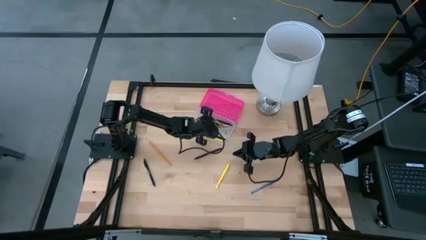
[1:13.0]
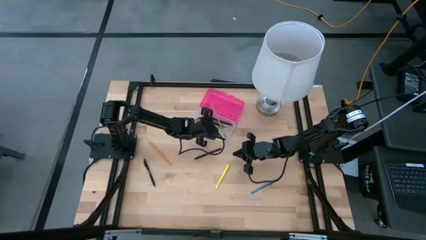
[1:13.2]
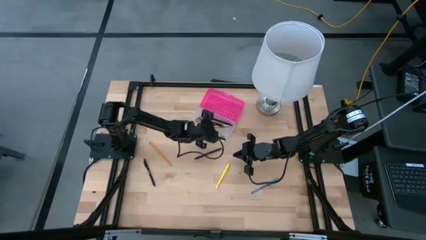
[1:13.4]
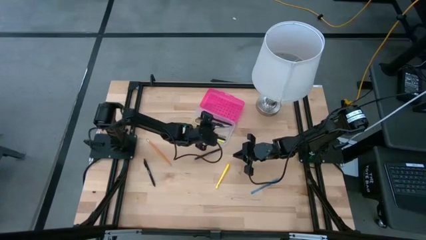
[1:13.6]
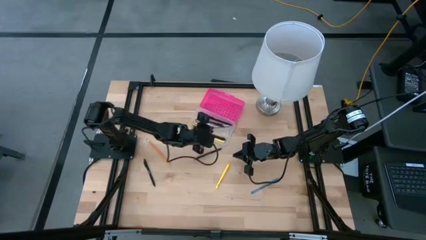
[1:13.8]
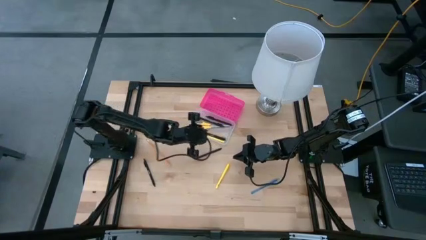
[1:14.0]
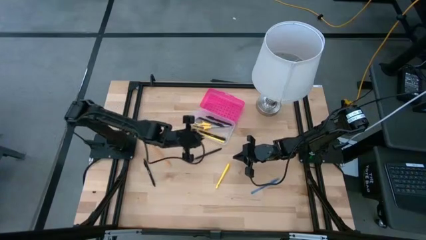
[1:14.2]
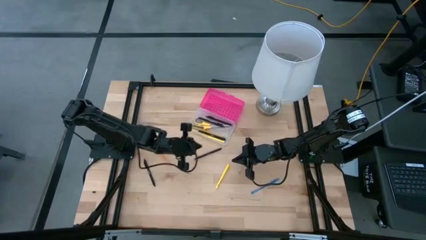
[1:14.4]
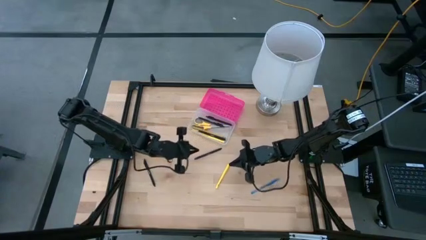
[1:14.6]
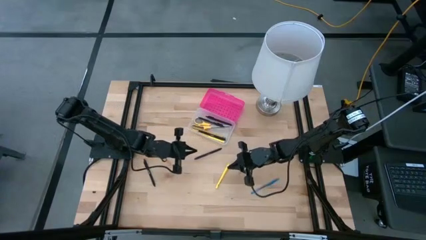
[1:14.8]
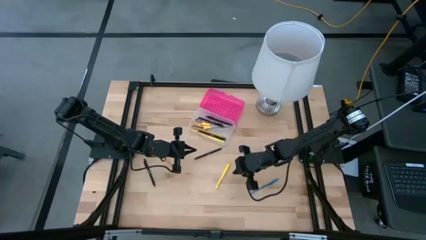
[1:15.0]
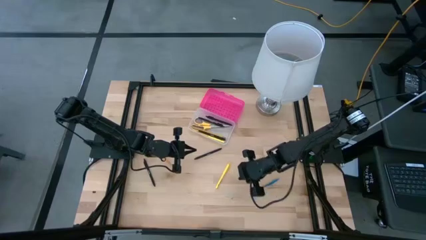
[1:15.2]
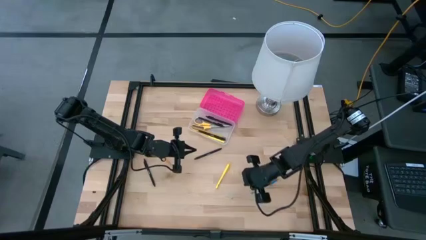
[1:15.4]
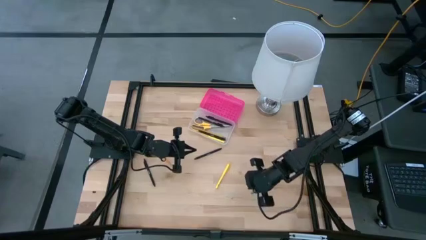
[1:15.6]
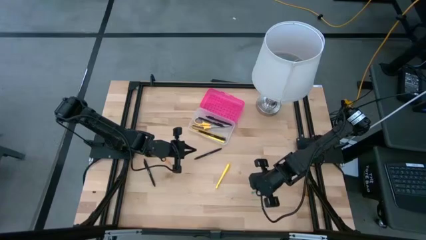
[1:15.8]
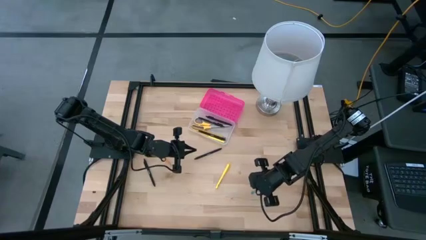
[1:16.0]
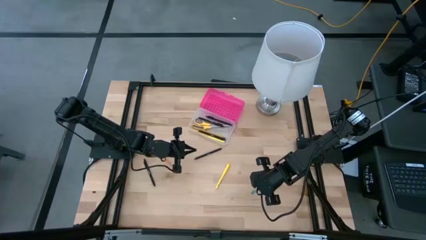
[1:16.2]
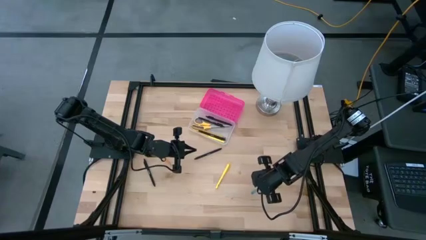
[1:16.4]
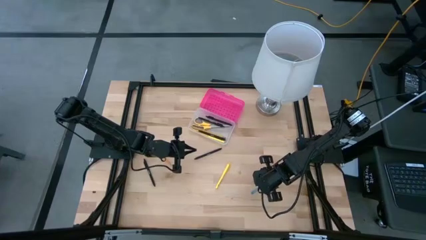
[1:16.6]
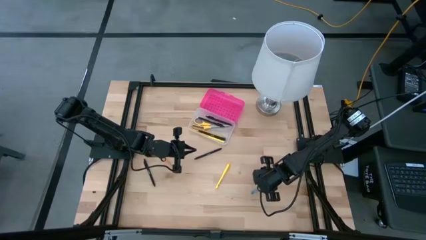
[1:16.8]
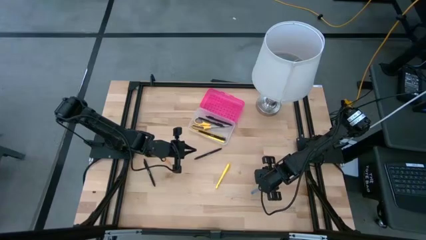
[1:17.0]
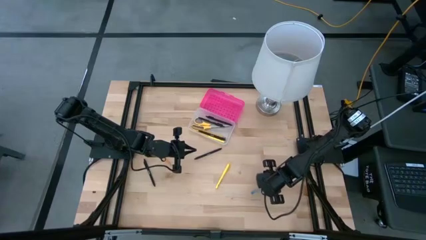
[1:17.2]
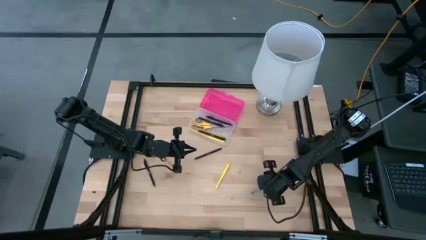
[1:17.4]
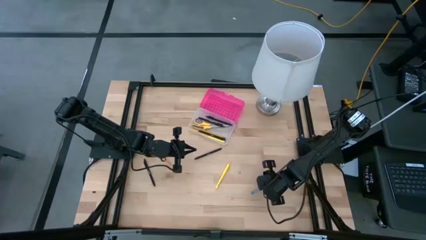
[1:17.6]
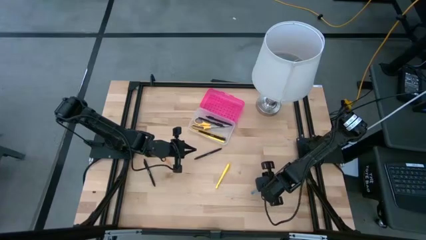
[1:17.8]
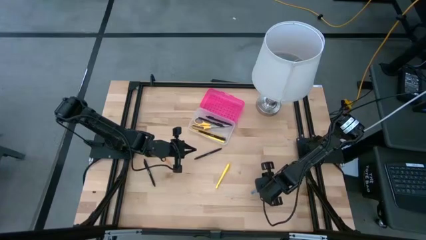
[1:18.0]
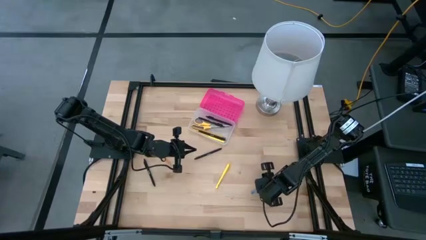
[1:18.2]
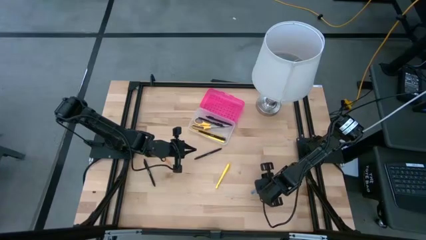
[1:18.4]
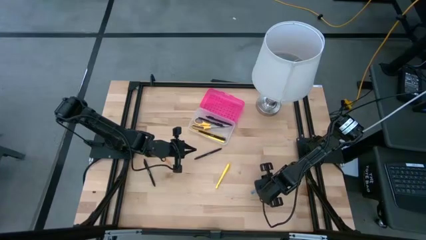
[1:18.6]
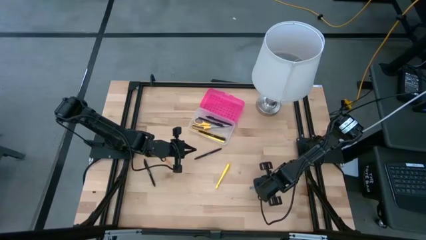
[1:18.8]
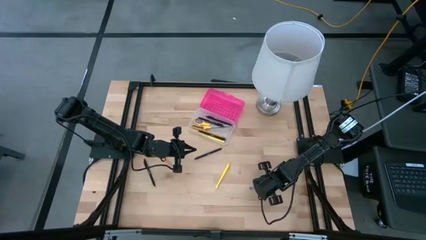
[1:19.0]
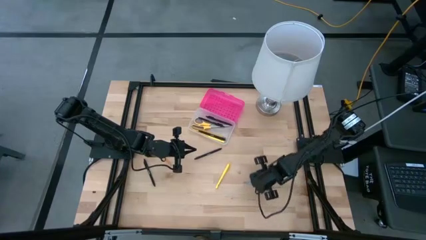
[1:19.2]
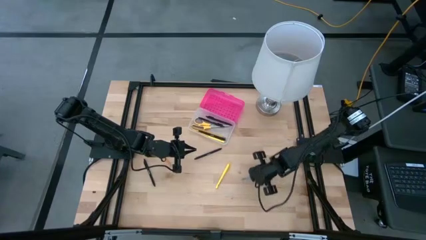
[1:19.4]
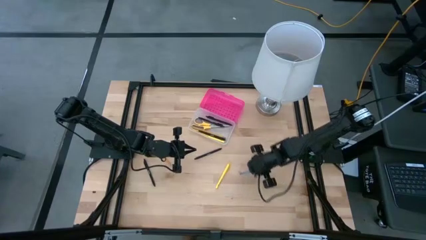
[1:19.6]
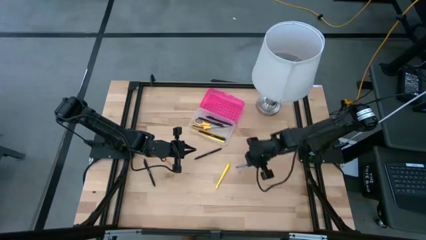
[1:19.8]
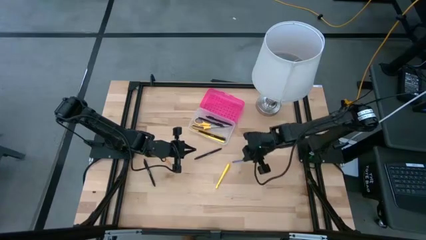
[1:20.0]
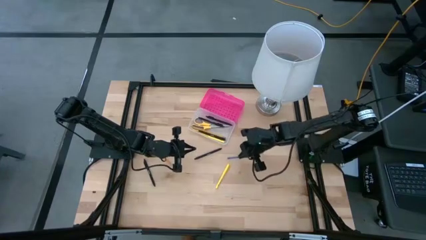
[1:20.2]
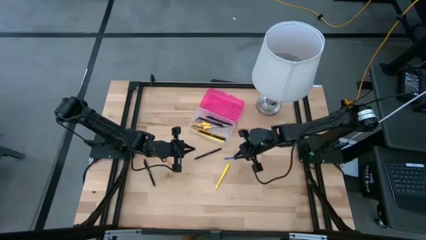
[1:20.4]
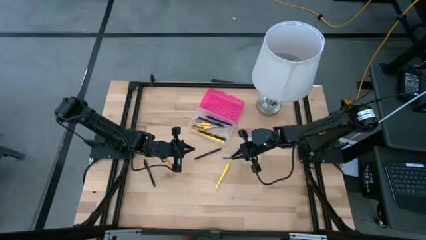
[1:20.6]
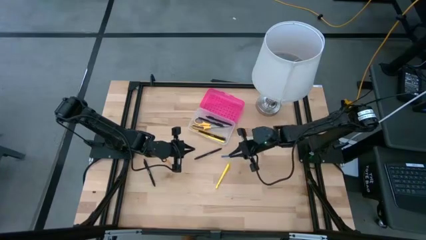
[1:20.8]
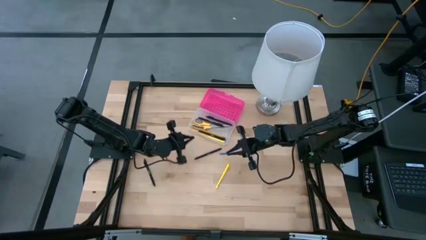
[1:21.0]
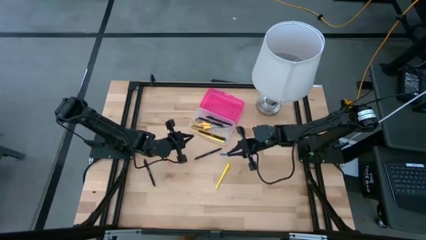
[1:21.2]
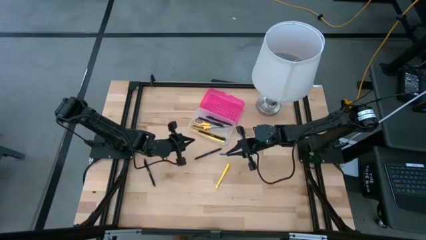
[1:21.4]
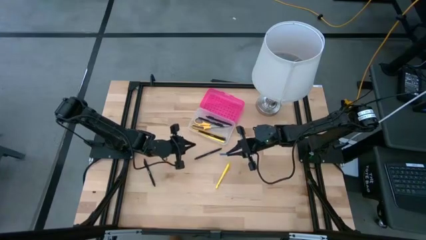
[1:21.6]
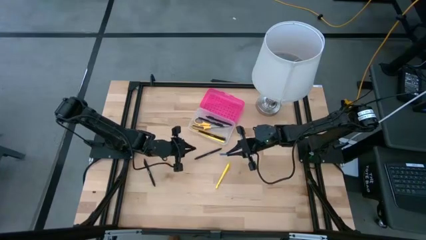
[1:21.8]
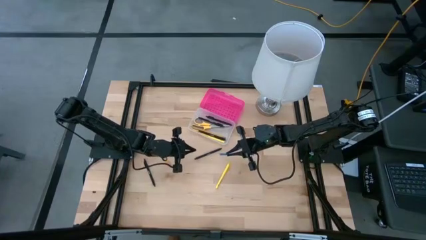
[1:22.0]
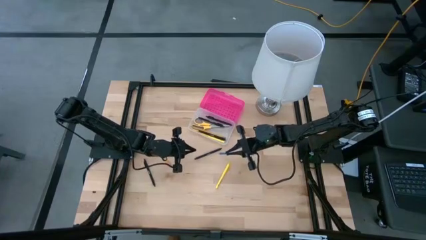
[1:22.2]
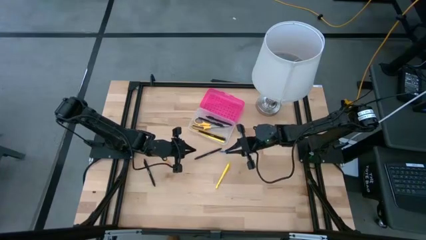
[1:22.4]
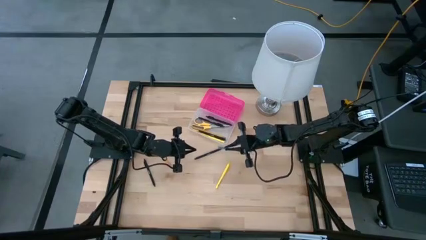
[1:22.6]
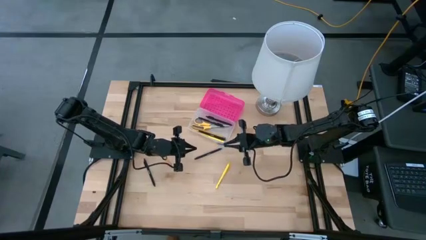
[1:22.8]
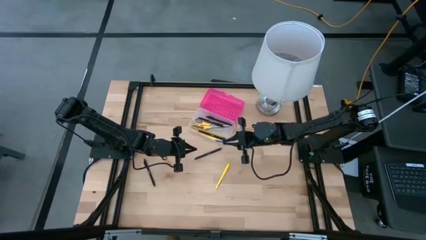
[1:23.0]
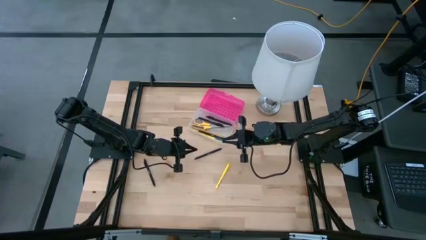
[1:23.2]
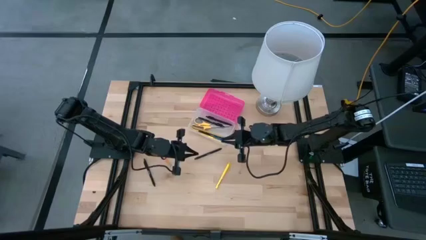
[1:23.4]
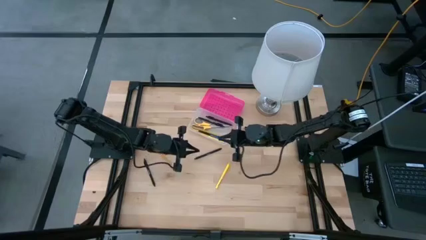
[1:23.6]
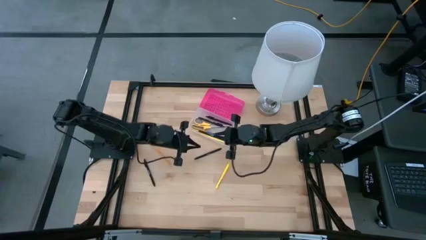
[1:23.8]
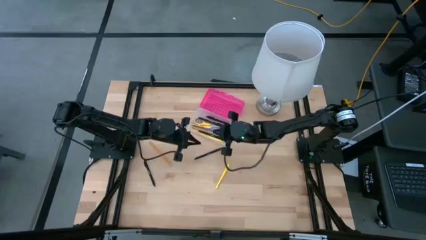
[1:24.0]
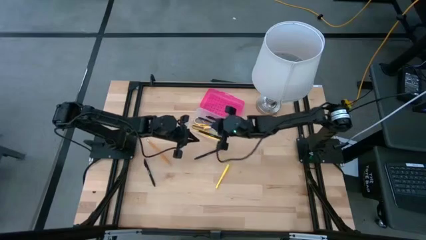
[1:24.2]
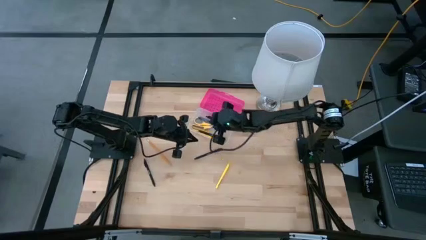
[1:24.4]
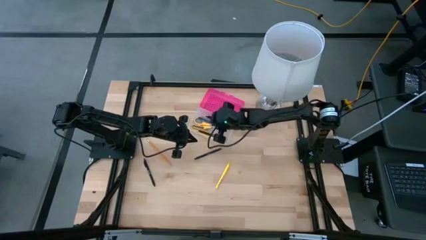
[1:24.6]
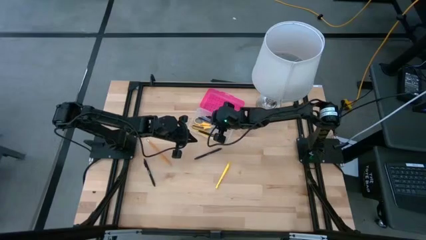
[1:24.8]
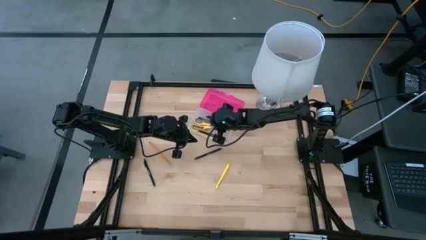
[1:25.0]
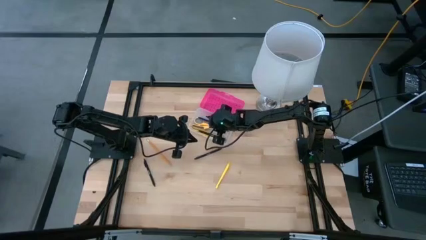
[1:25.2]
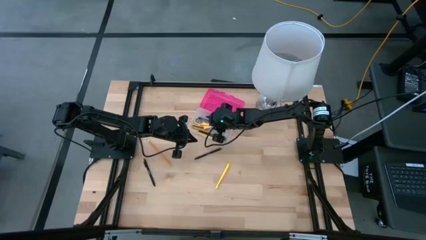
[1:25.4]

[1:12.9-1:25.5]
Task: Pick & place school supplies into a supply box
Put the blue pen into the pink supply box

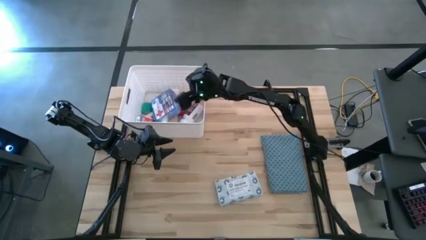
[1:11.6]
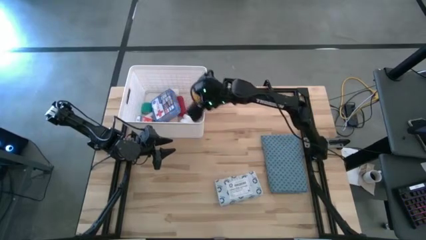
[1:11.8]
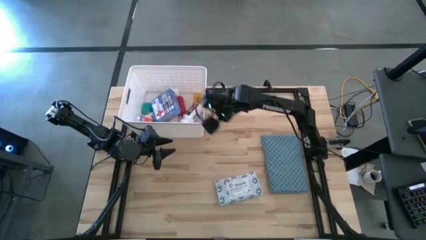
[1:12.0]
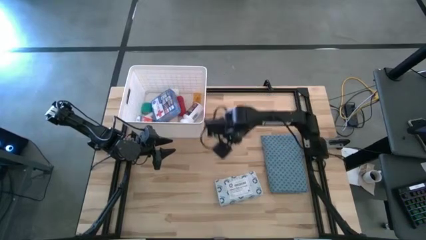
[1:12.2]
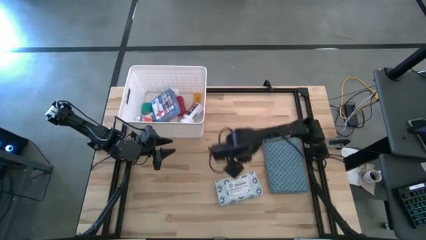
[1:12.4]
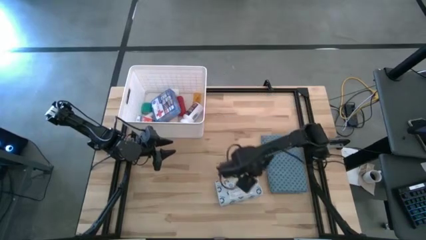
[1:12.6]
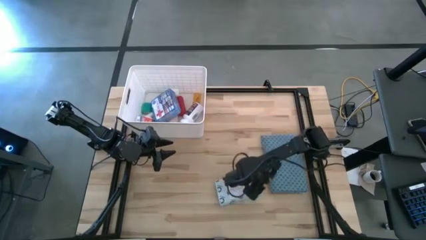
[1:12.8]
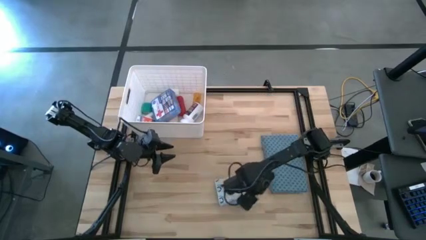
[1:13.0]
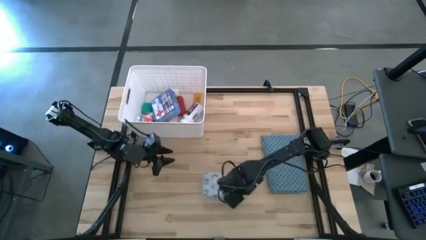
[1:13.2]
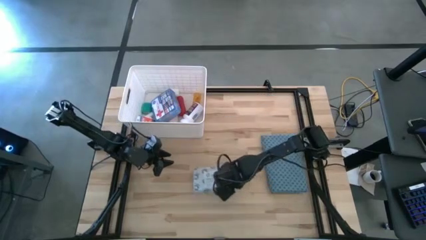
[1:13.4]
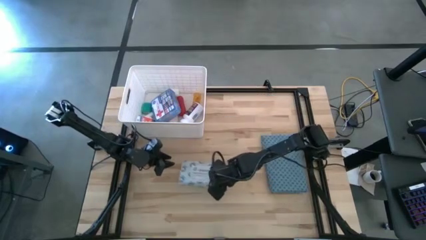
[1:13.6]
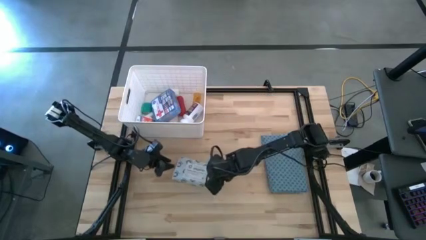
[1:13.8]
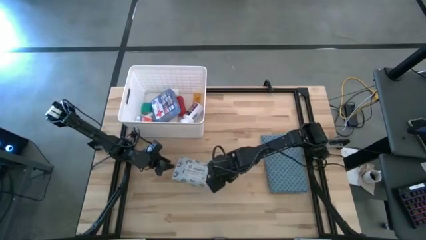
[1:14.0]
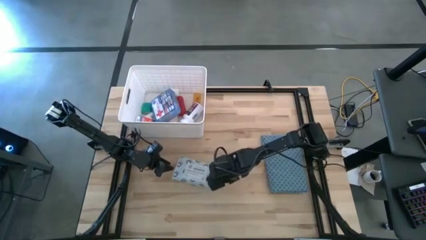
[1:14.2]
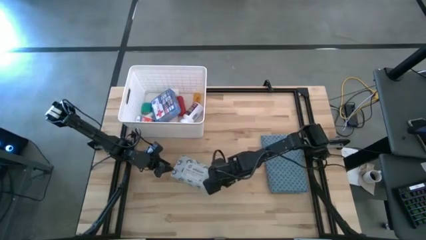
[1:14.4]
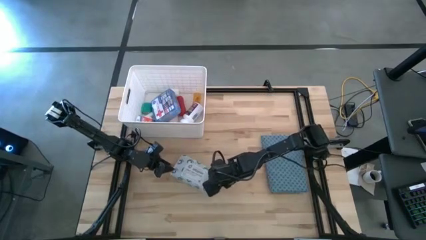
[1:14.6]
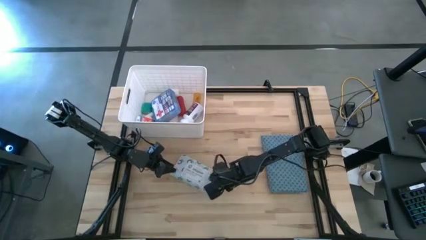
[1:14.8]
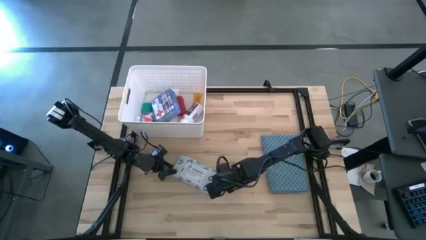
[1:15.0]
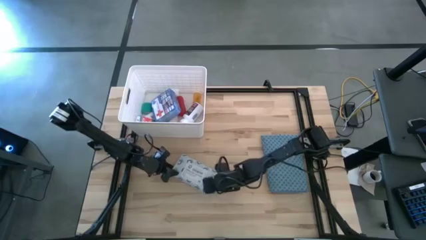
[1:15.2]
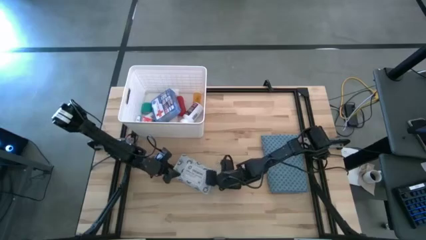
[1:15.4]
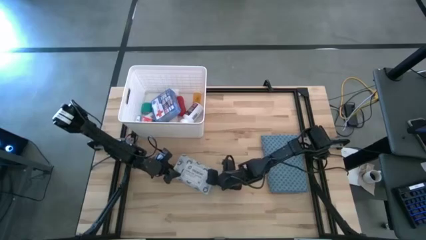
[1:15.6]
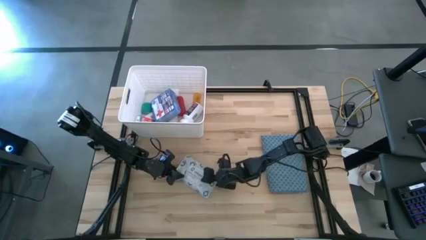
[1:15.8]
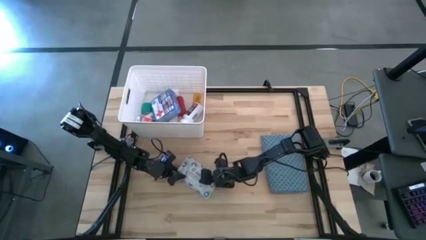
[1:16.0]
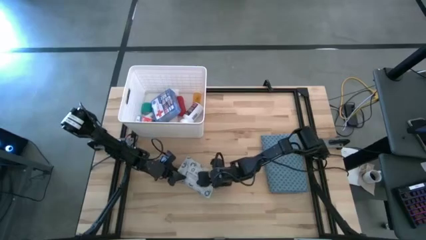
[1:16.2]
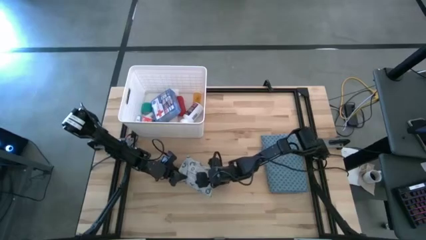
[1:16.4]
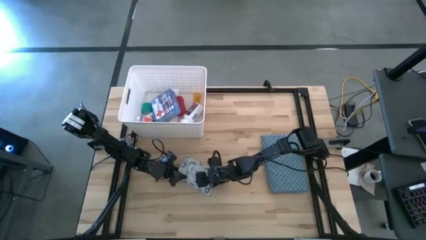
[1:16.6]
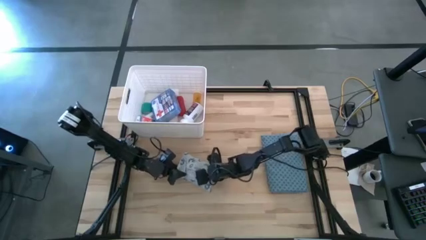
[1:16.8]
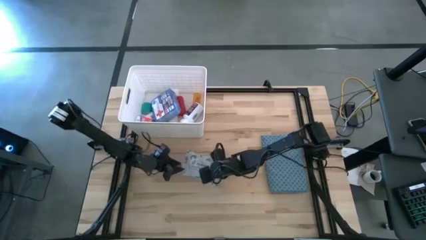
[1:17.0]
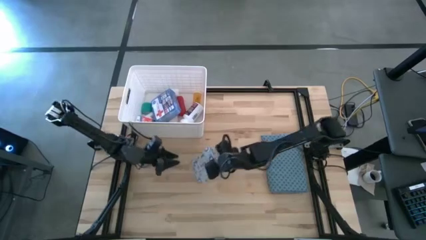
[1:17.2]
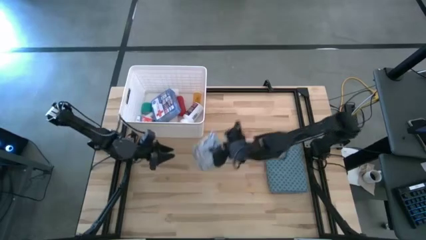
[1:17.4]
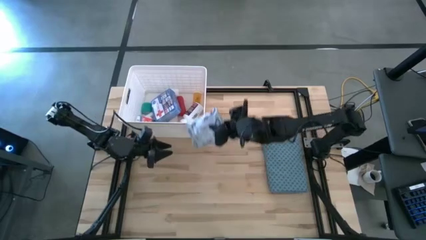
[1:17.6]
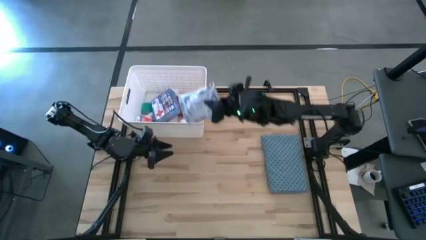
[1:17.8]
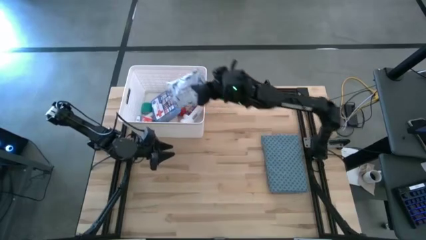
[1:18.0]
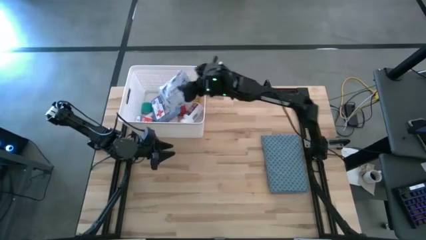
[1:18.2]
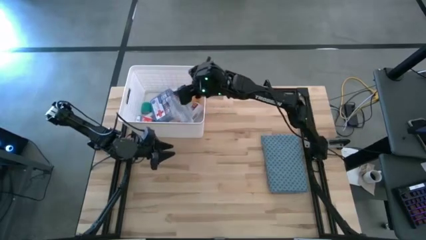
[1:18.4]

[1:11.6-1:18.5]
Task: Pick & place medical supplies in basket/bin
Put the white blue mailer bag into the white bin
